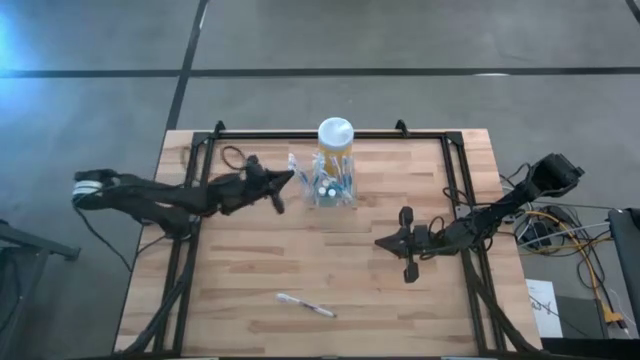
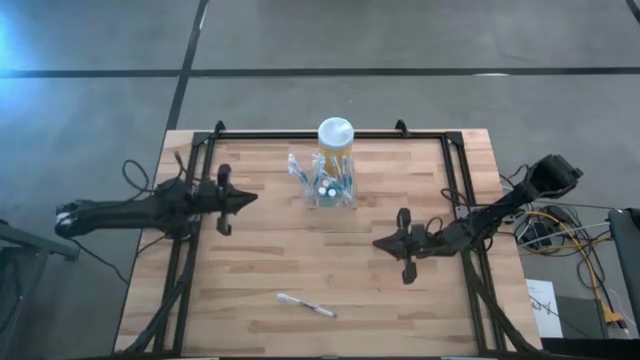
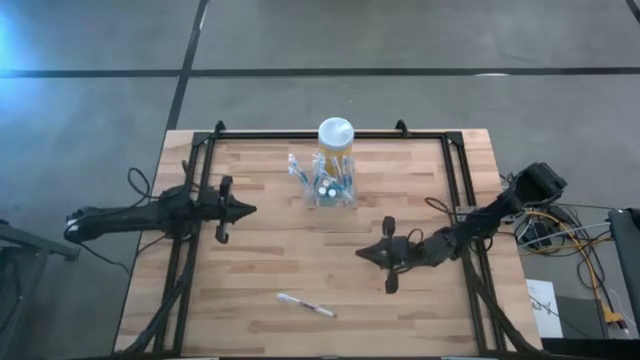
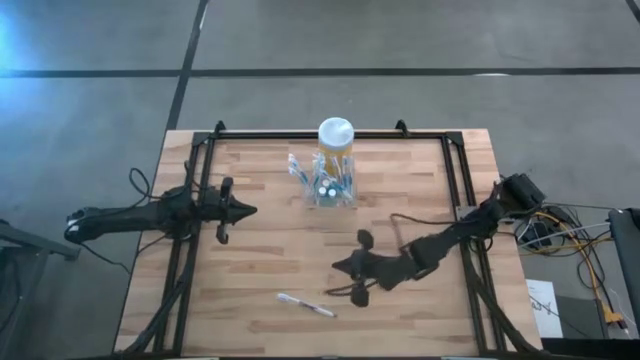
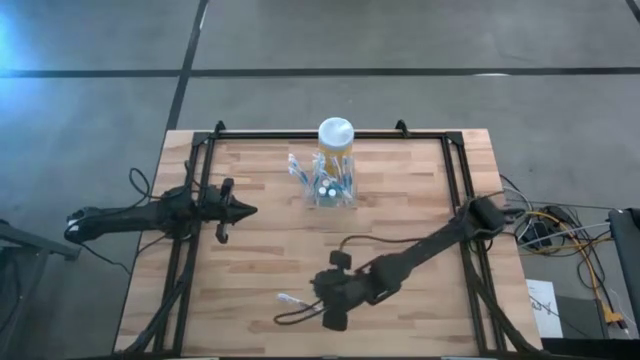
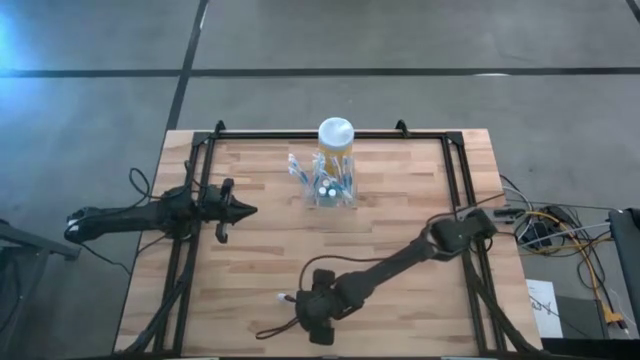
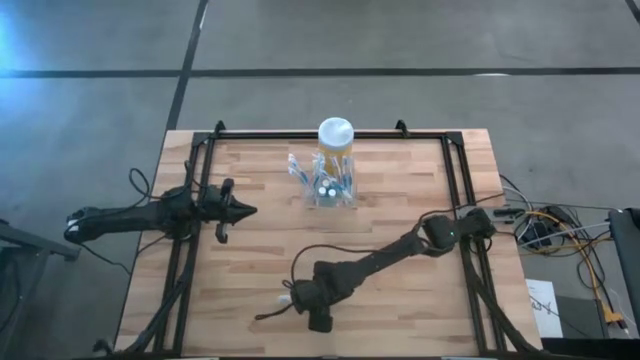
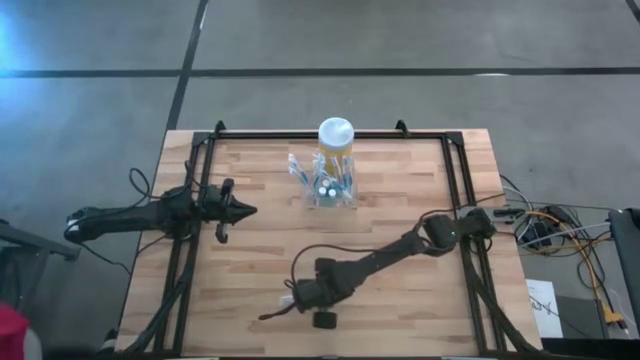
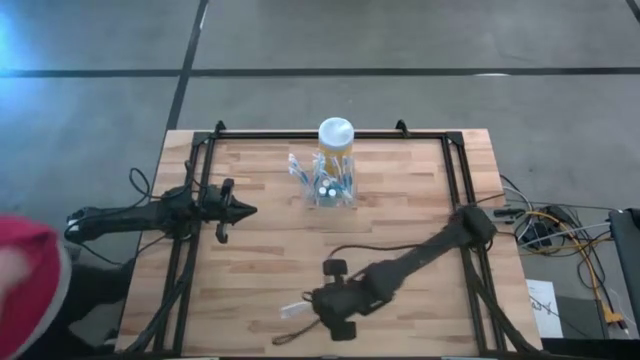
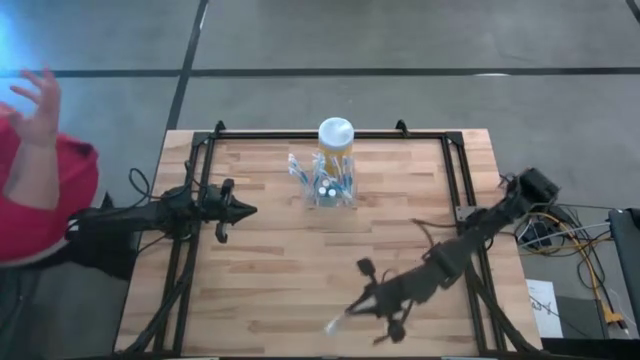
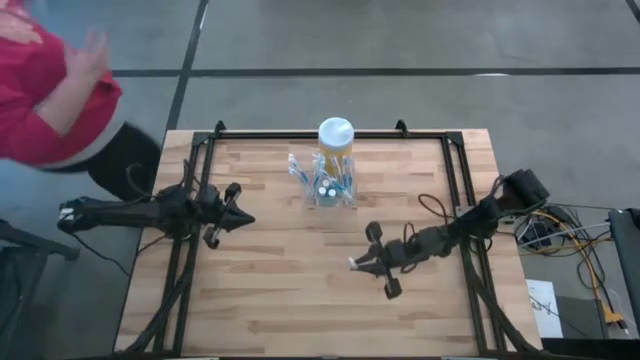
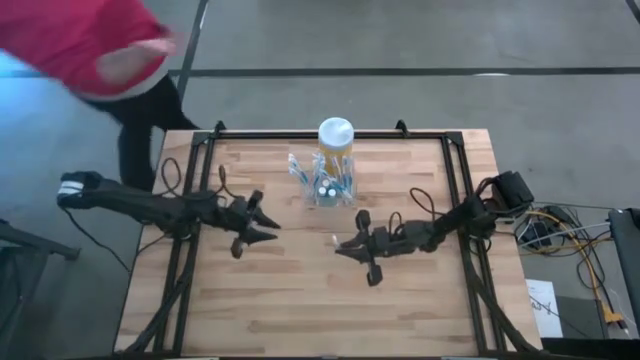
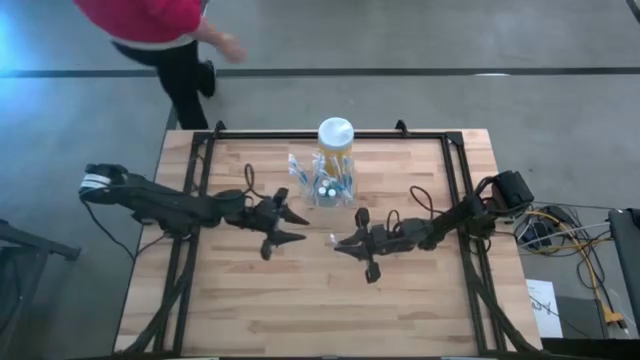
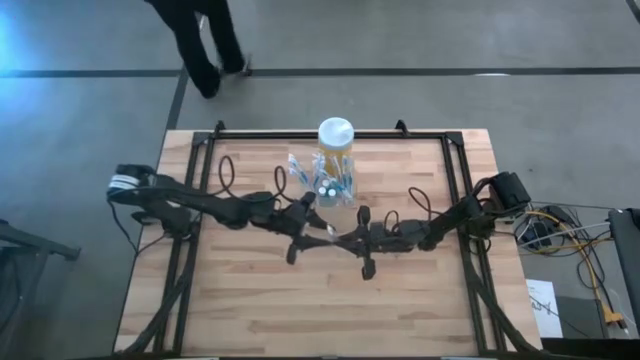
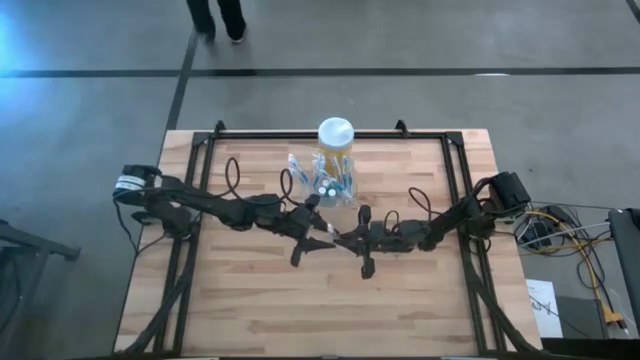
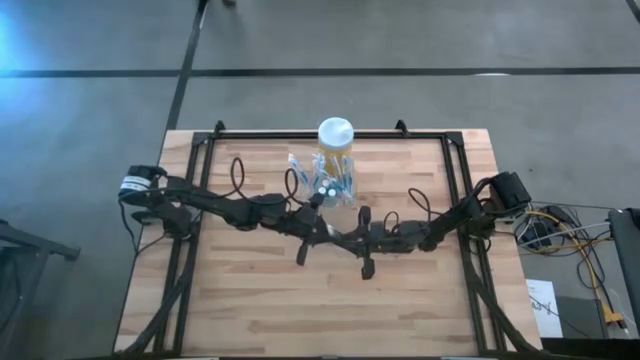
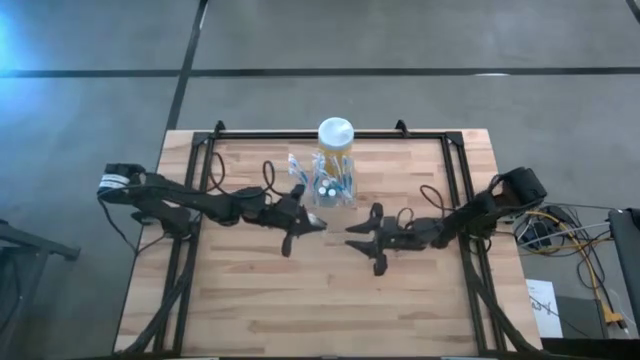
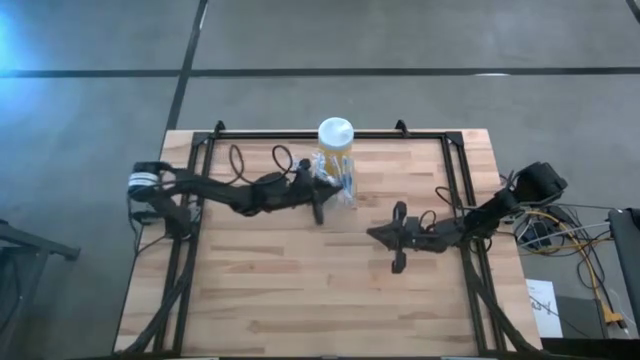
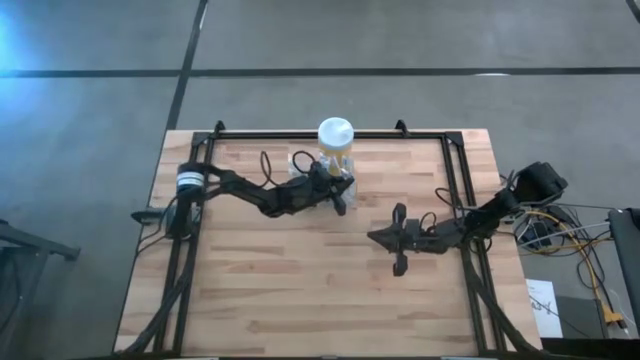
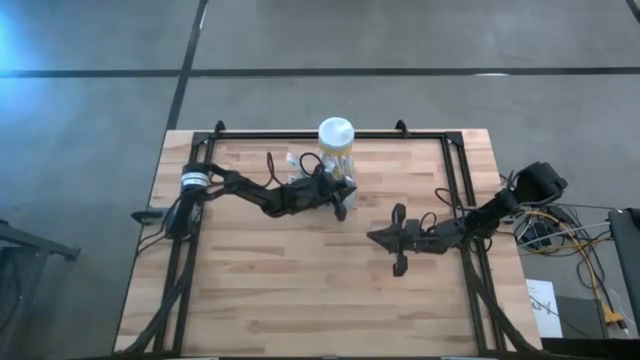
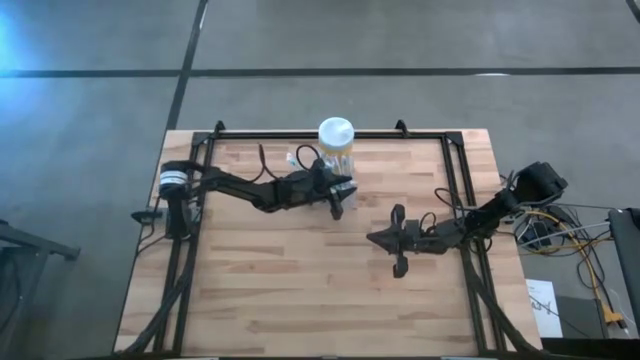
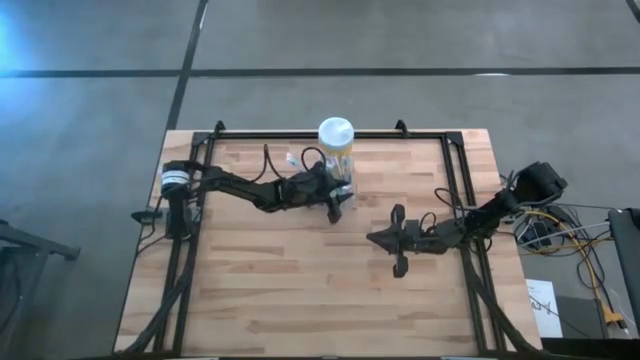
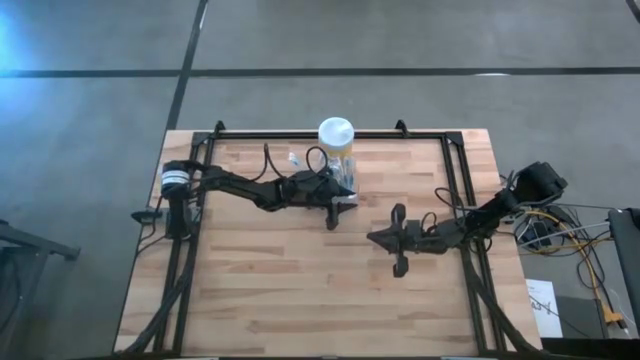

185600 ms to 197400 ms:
Task: Pick & Place toothbrushing station
Put the violet toothbrush into the transparent organizer

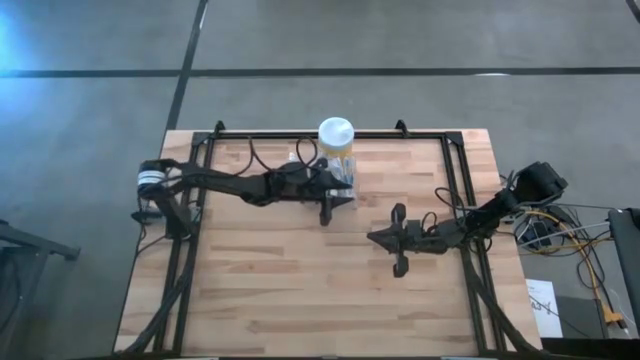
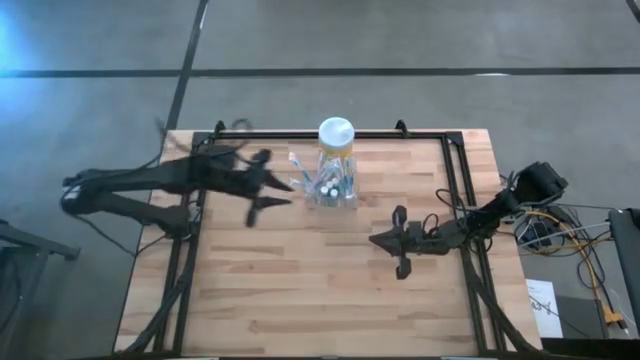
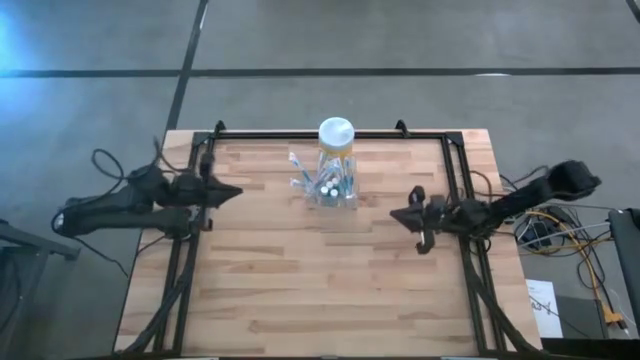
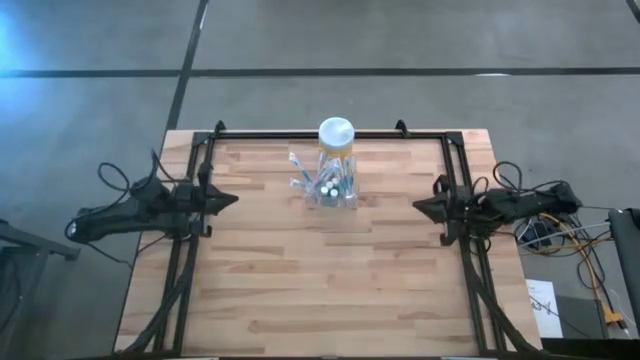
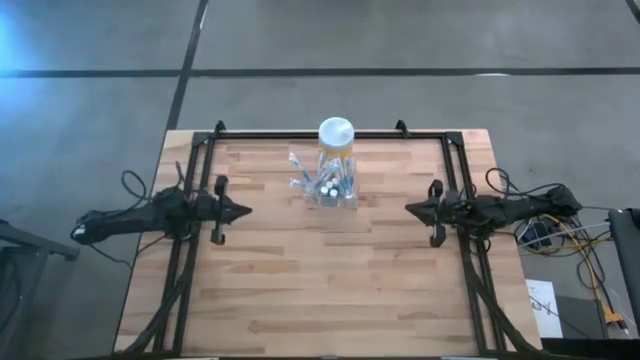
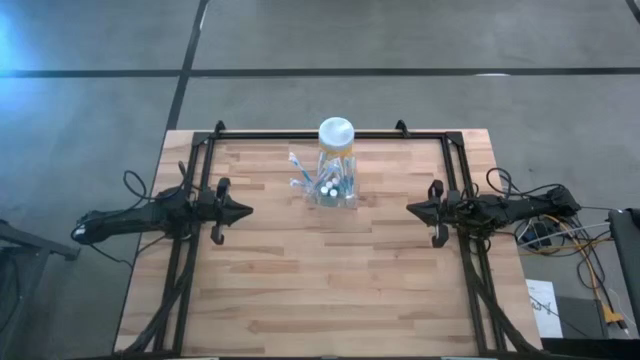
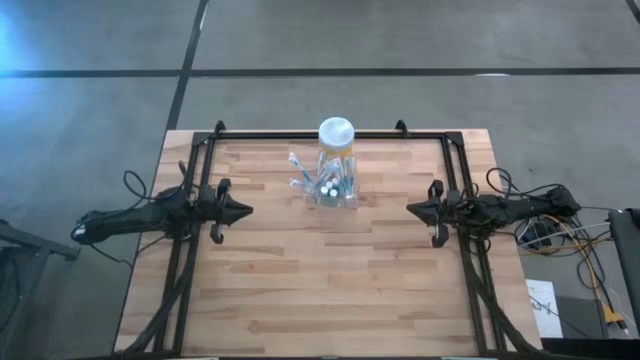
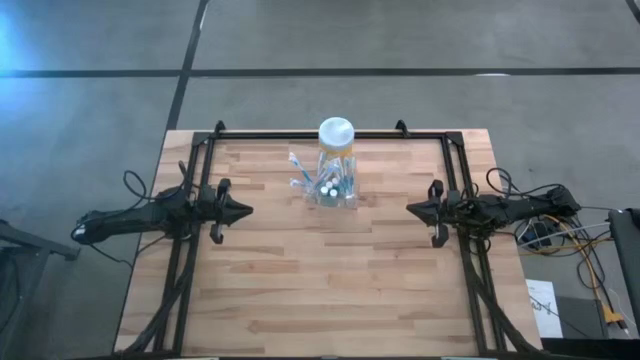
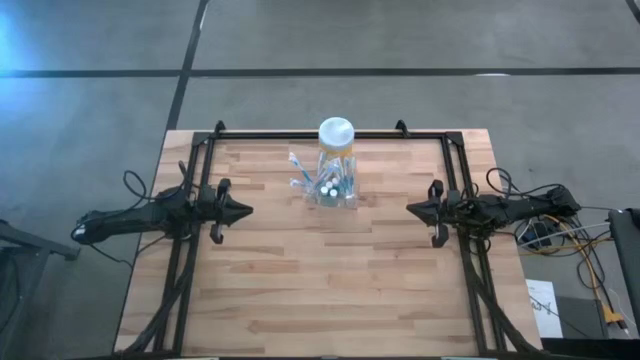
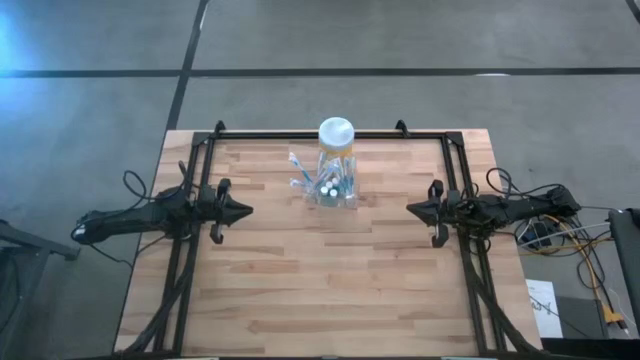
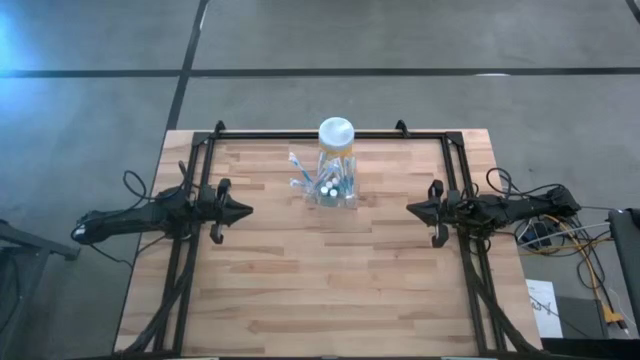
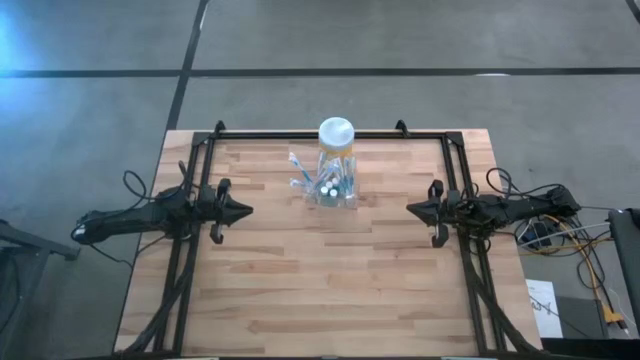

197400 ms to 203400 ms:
Return to Home Position

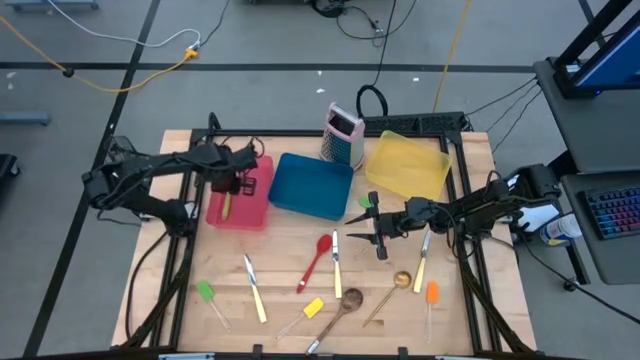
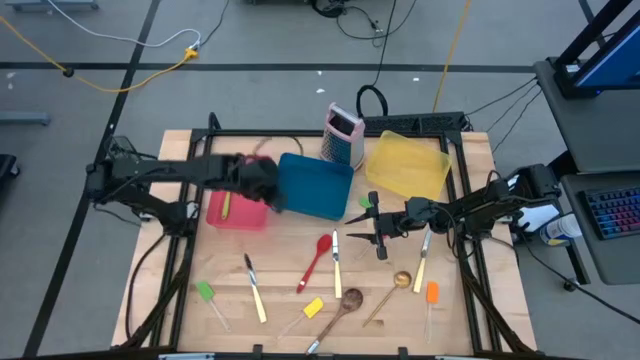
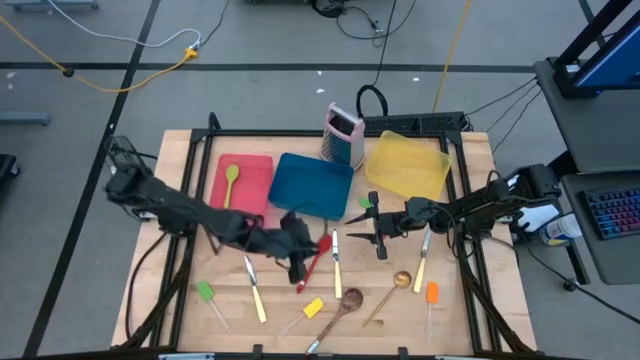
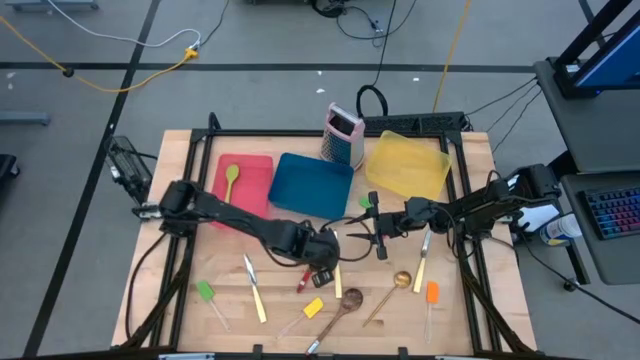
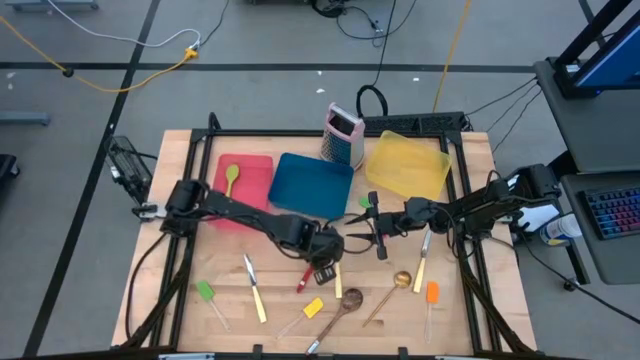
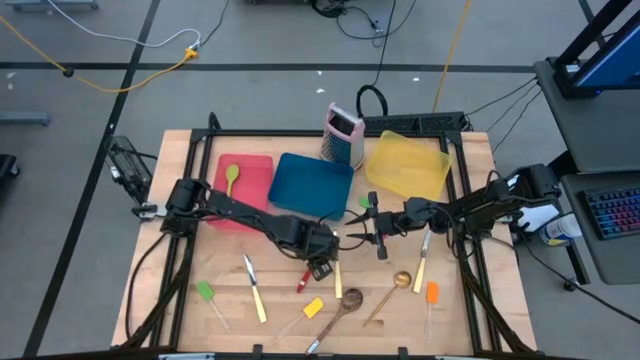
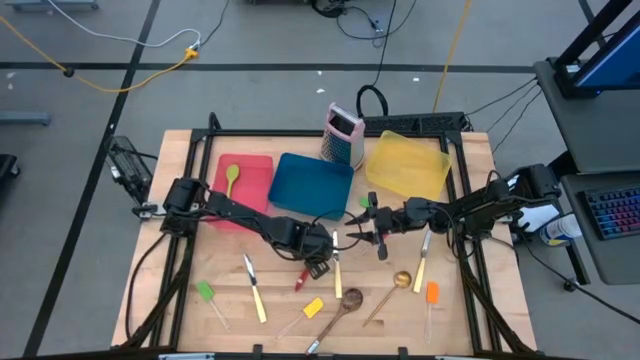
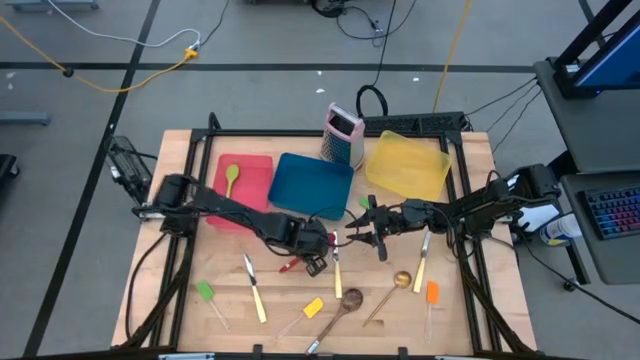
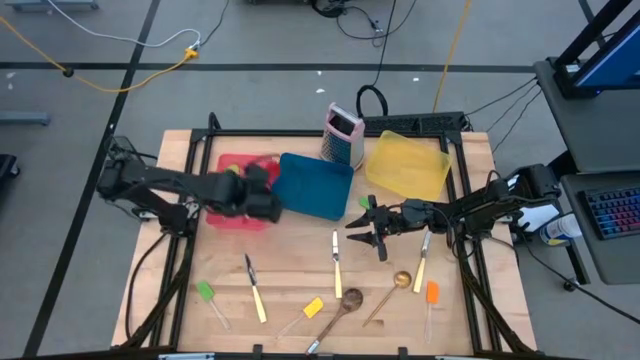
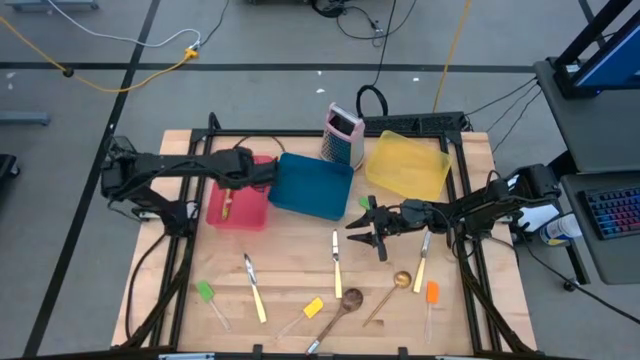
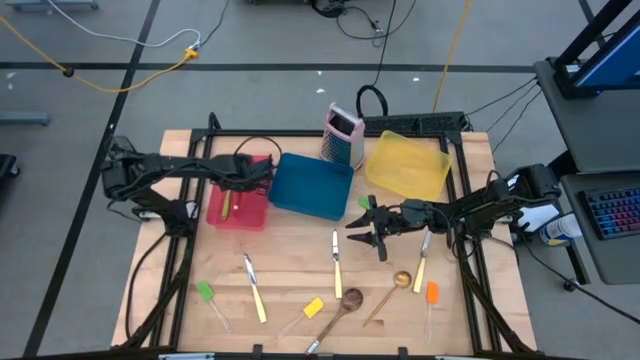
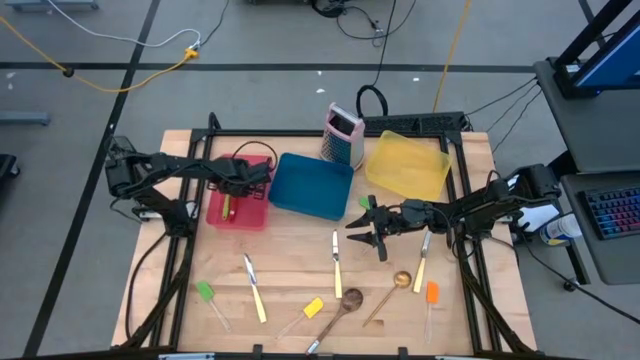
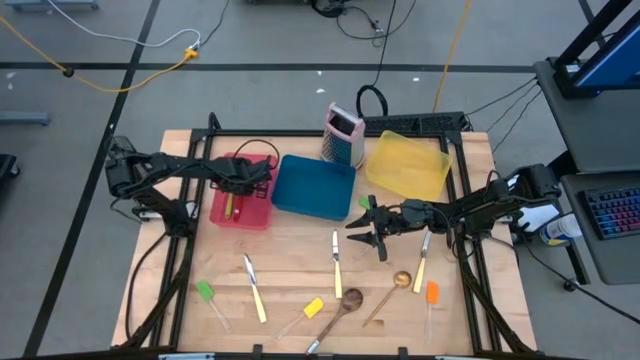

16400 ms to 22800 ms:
Task: Pick & Place Kitchen Items
Put the red spoon into the red bin
